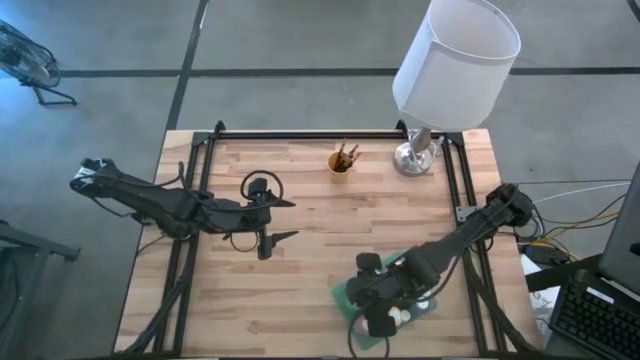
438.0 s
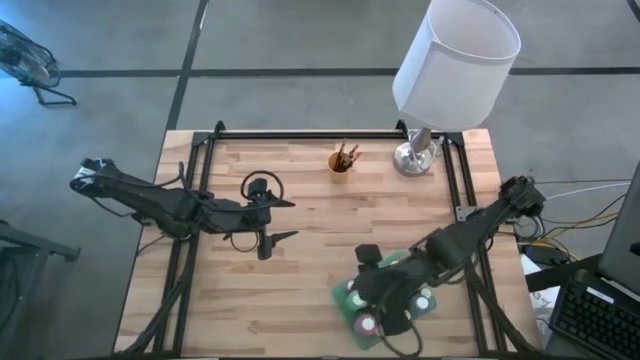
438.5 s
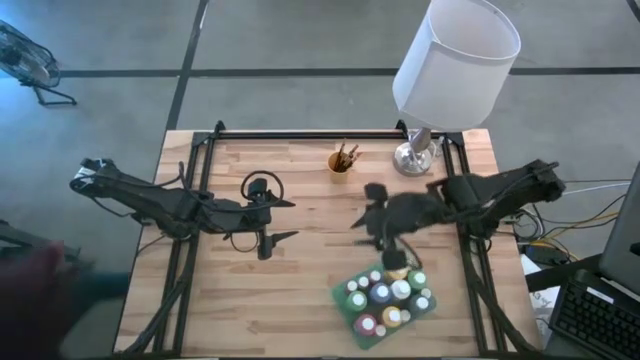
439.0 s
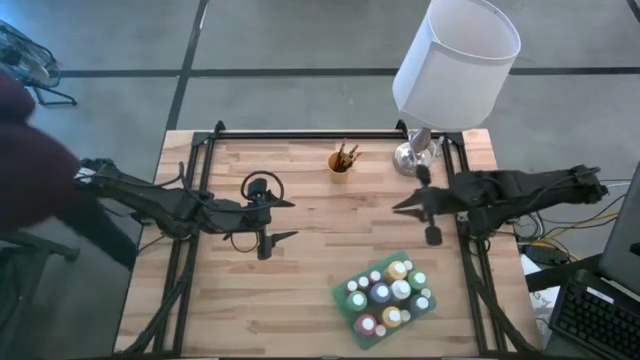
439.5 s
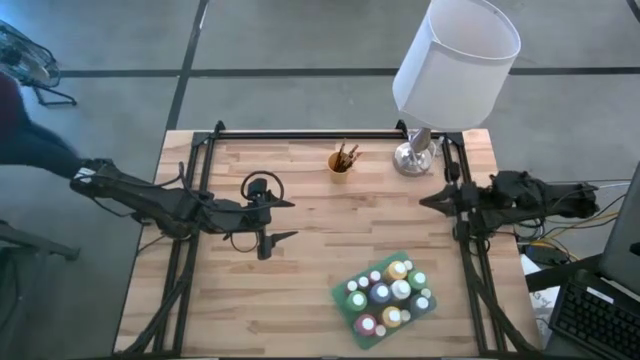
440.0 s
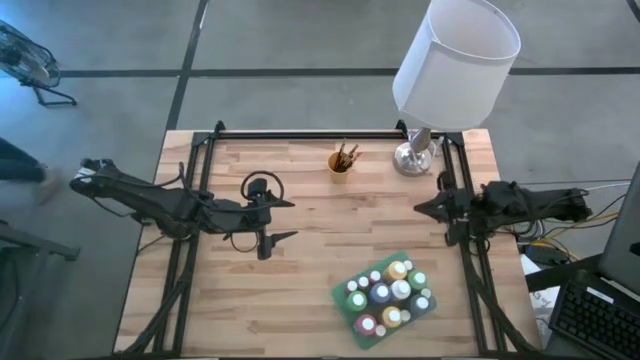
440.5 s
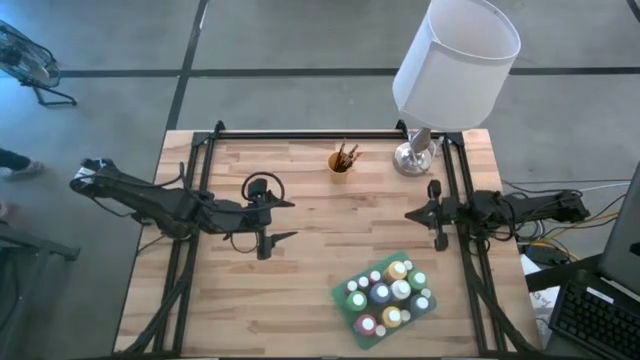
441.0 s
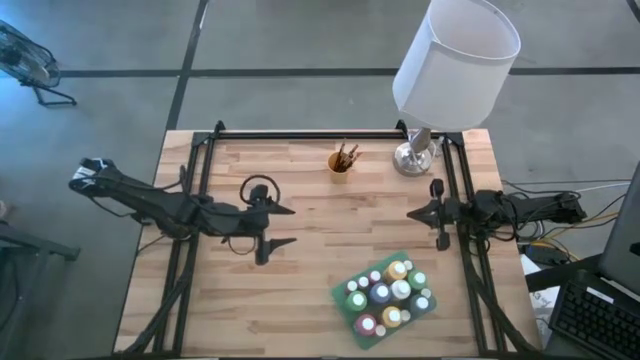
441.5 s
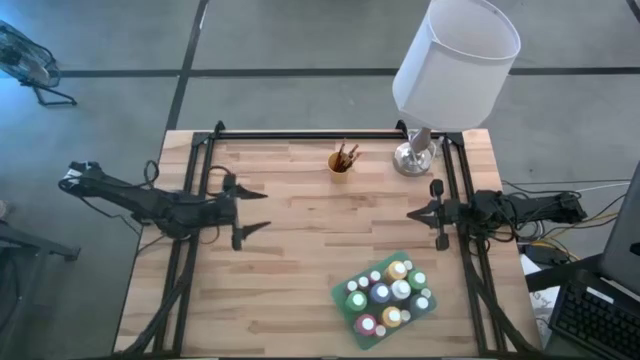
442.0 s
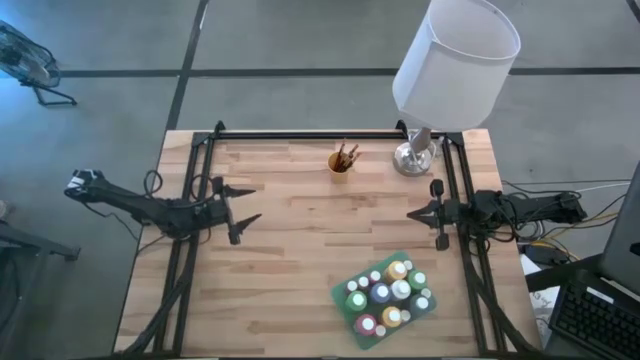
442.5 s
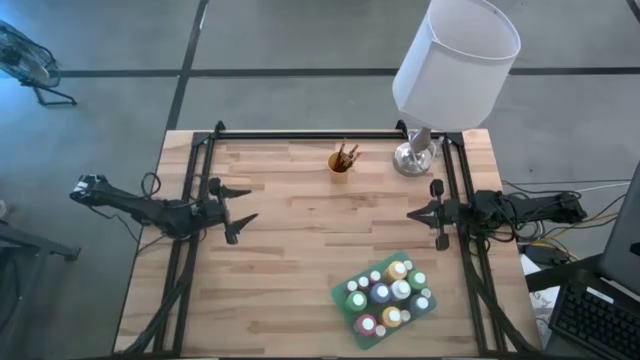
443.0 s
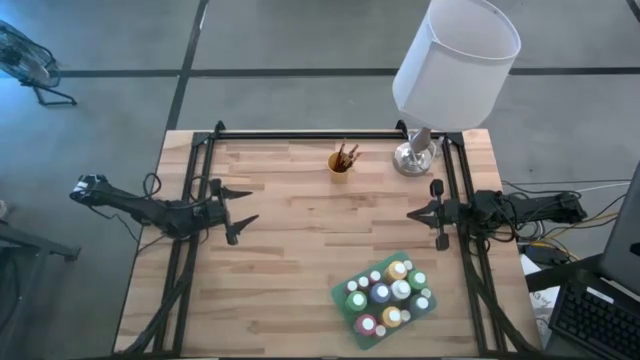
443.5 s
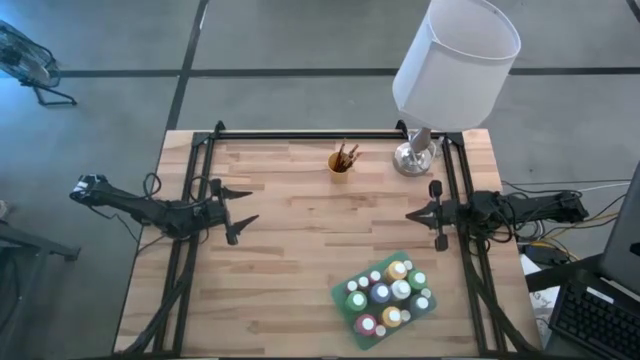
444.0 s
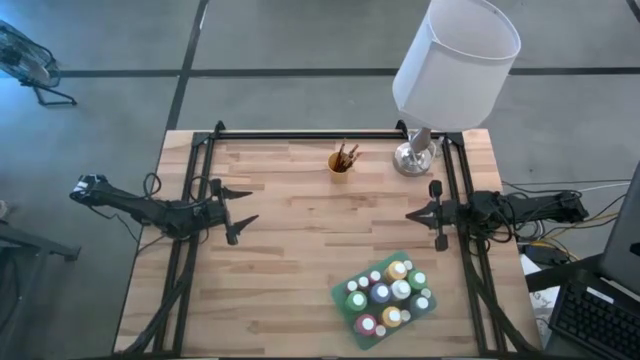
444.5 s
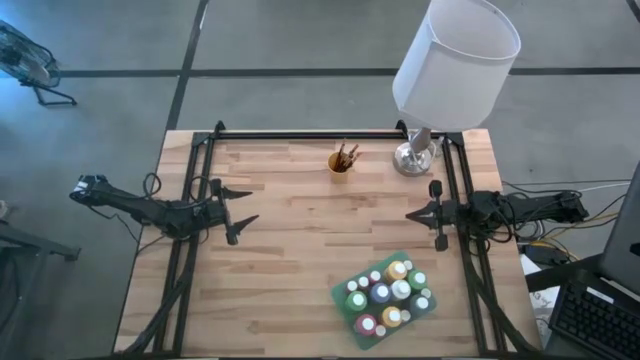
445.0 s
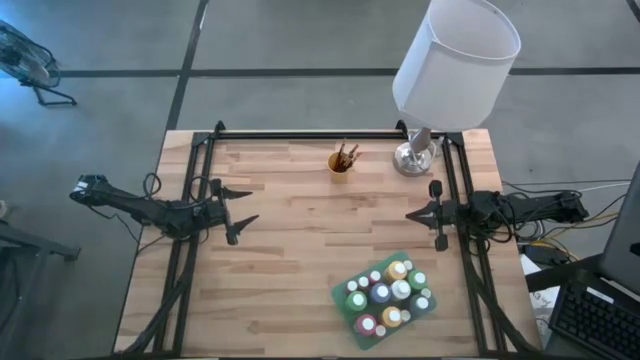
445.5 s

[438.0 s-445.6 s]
Task: Pick & Place Paint Supplies
Return to Home Position

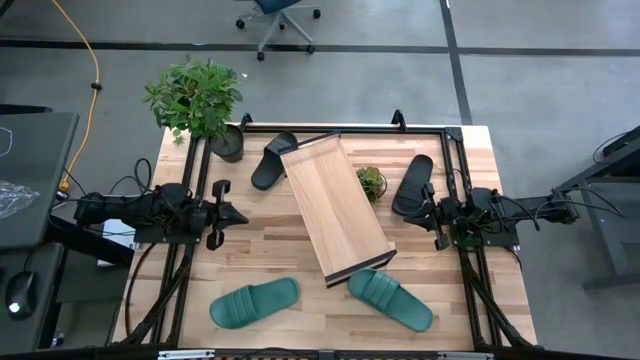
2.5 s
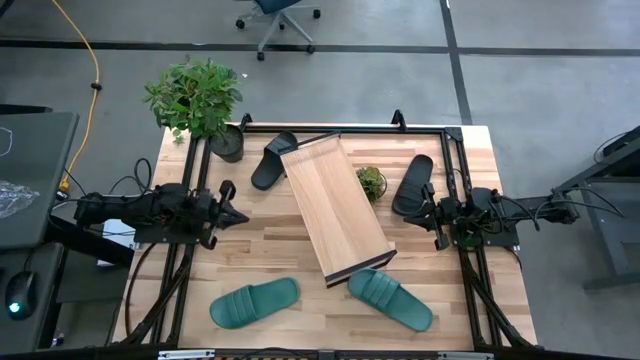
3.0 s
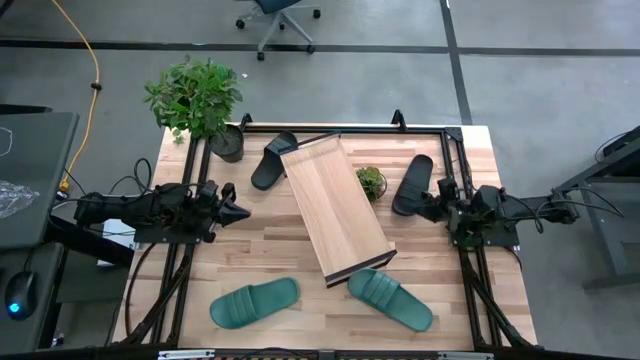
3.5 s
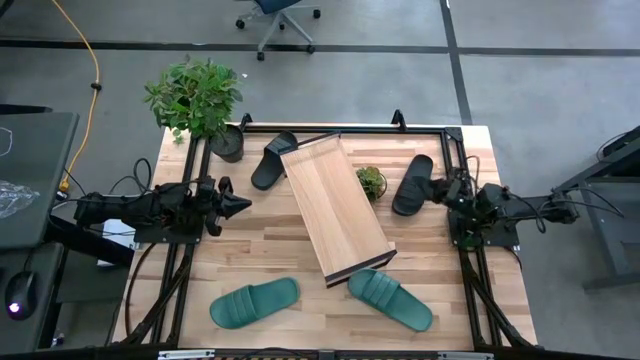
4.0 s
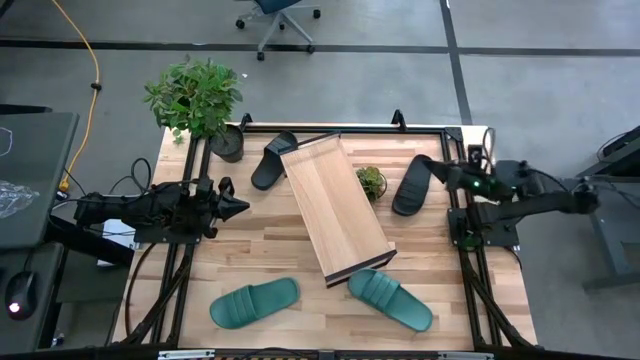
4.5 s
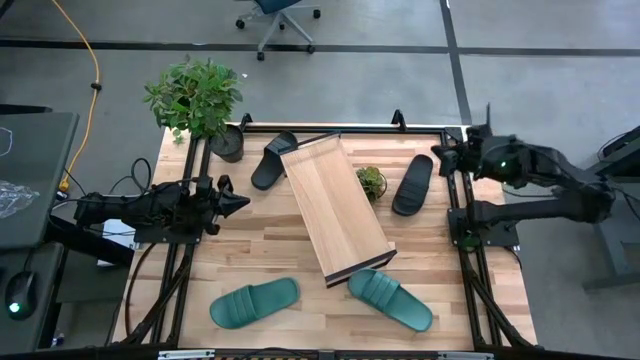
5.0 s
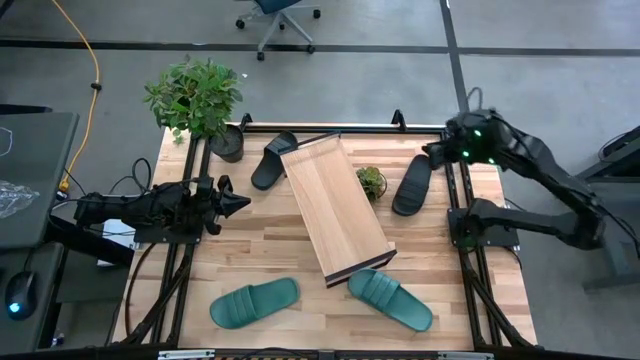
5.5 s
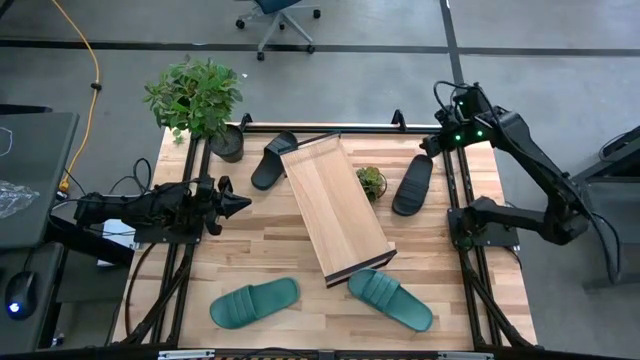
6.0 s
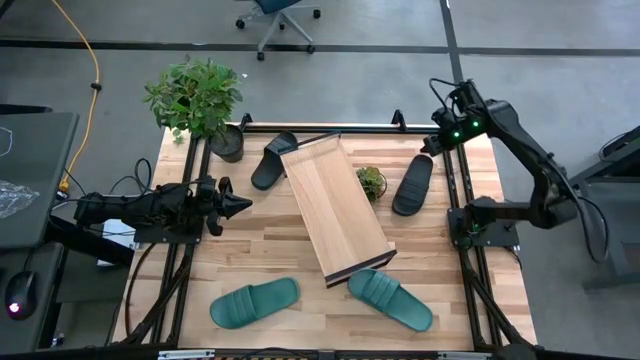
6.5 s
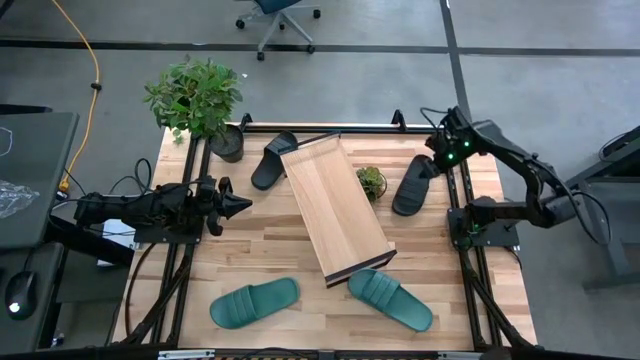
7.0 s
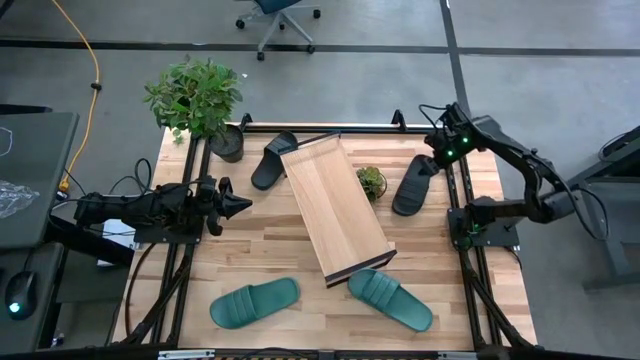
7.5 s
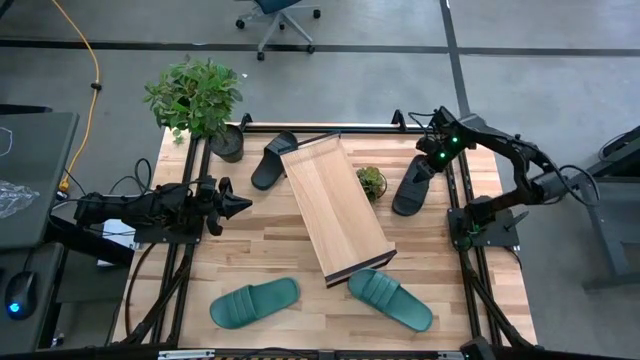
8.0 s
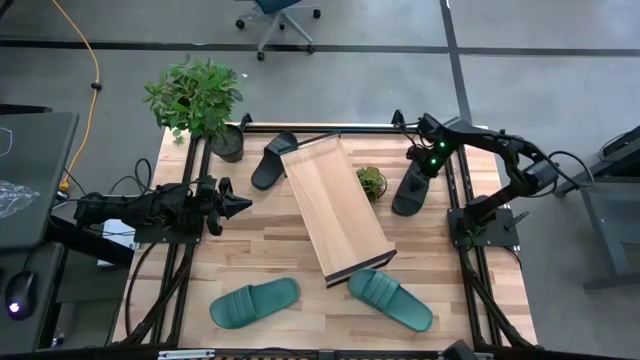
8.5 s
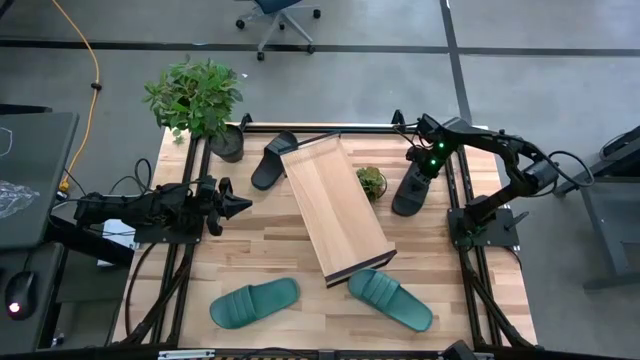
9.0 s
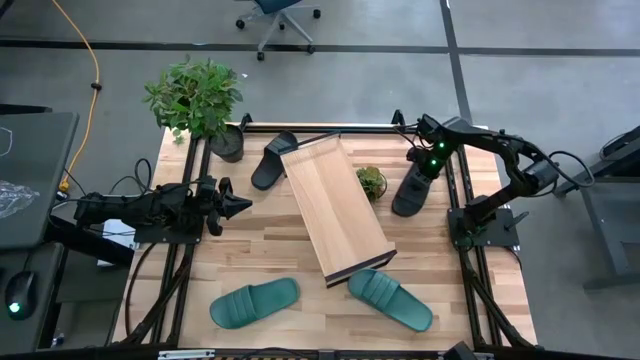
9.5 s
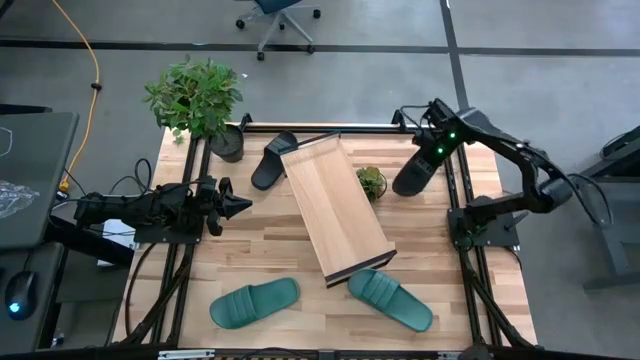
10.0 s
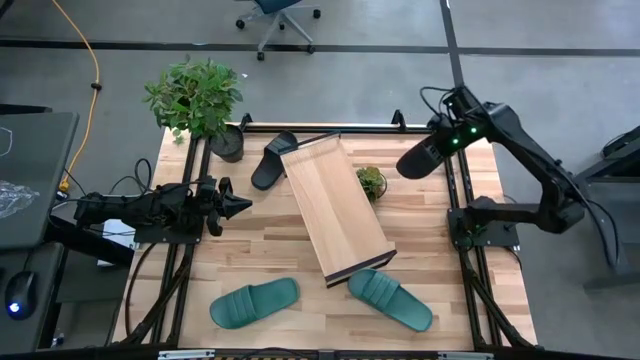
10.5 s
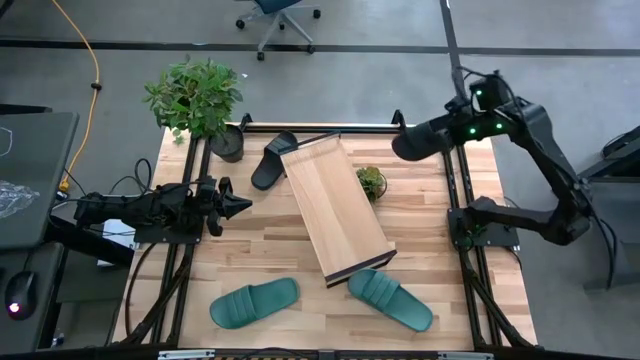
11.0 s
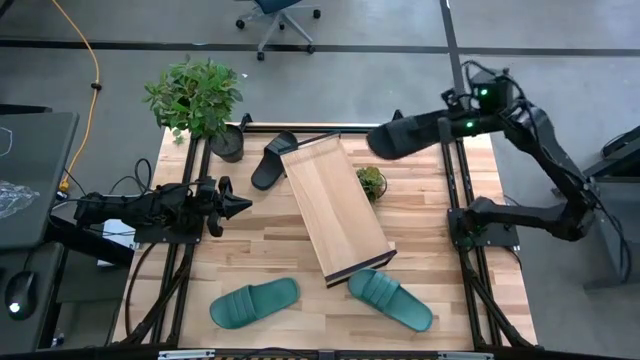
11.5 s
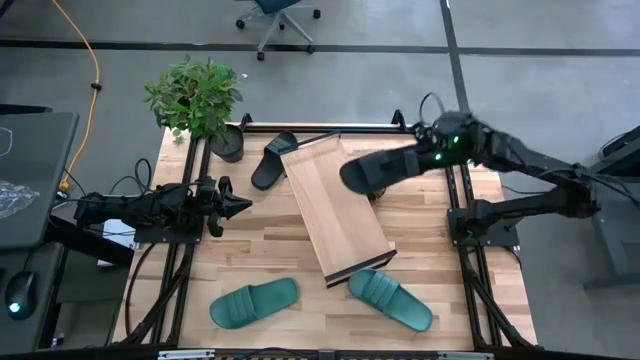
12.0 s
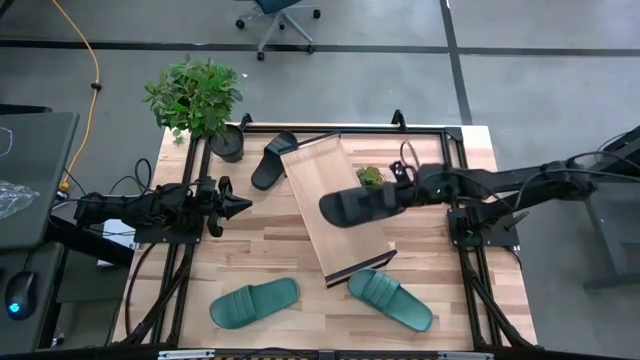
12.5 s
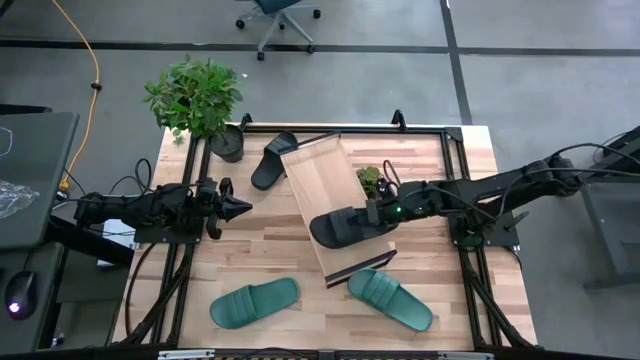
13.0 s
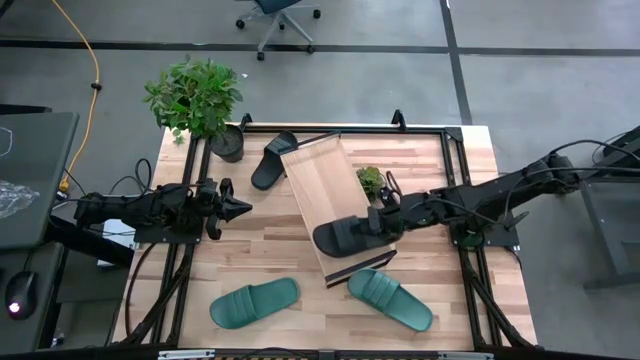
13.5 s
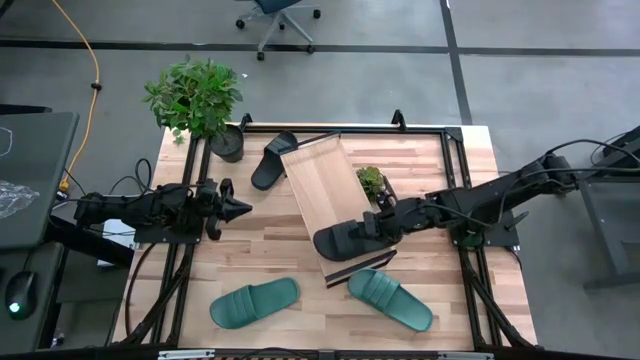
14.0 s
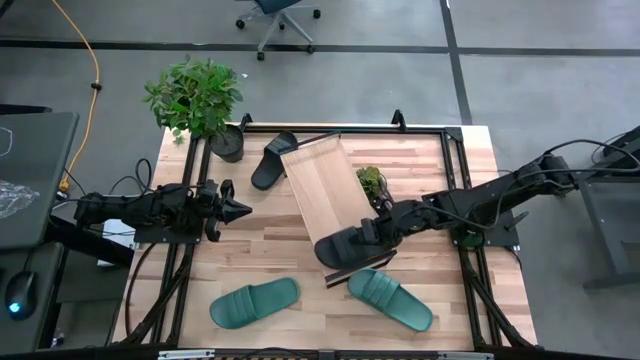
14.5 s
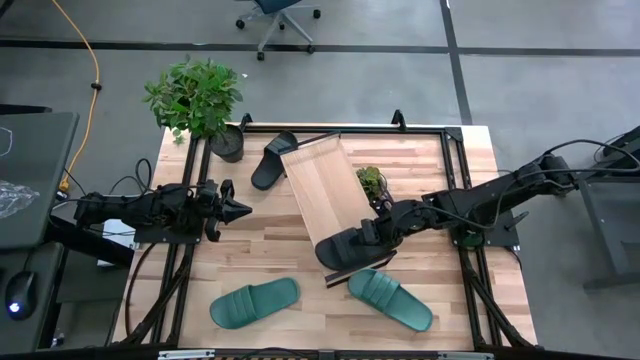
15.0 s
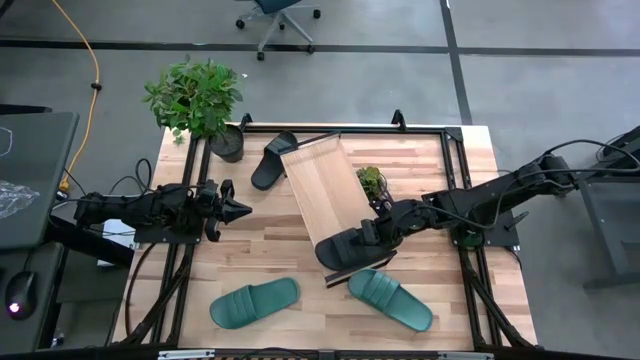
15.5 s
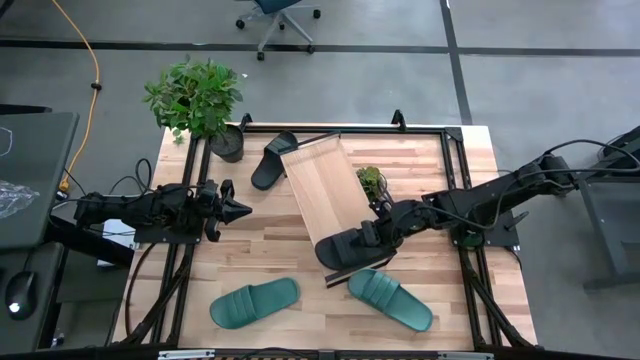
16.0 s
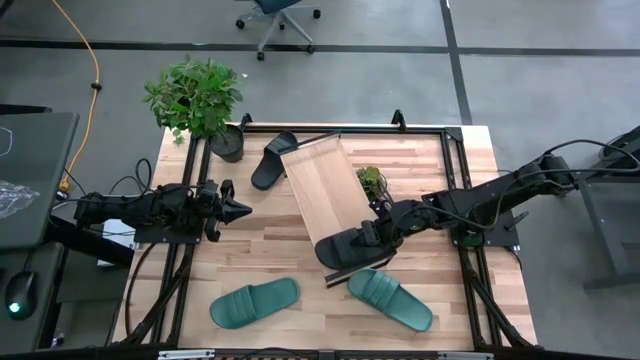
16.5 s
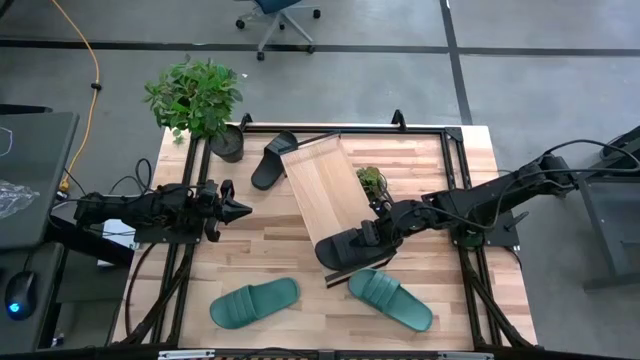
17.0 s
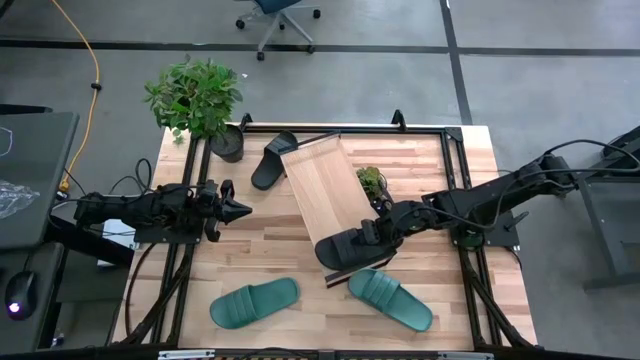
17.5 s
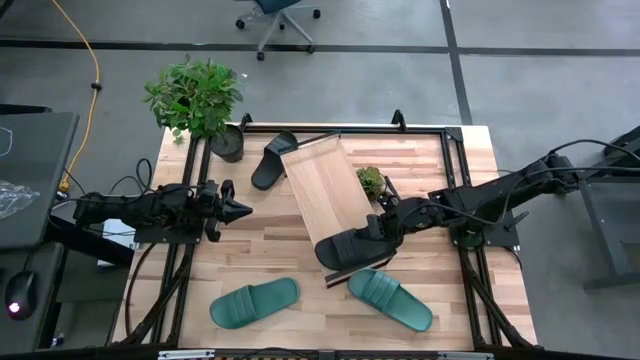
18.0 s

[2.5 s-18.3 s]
Task: Pick and place slides into the shelf
Put the right black slipper on the shelf
